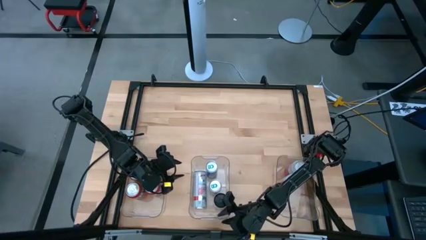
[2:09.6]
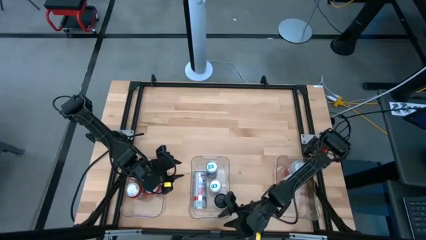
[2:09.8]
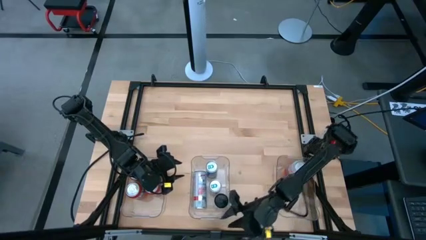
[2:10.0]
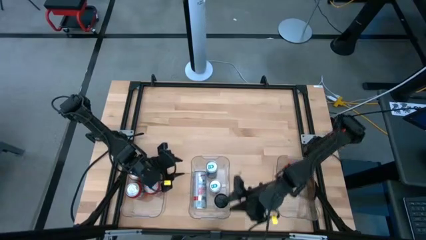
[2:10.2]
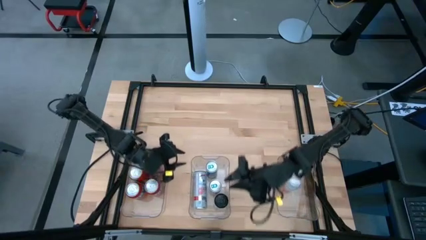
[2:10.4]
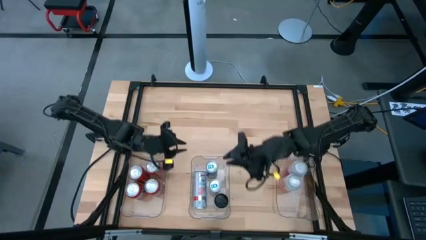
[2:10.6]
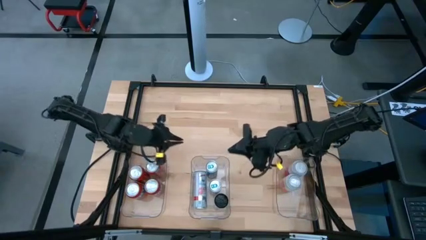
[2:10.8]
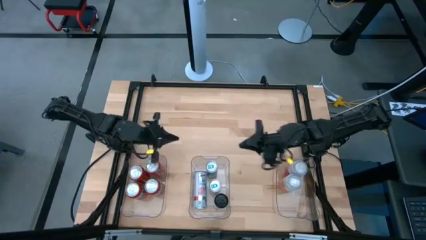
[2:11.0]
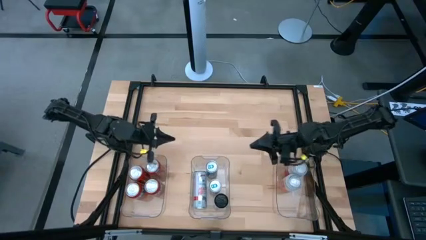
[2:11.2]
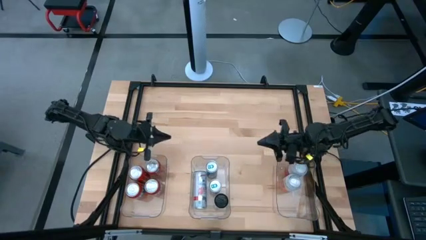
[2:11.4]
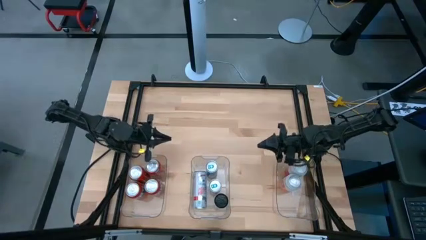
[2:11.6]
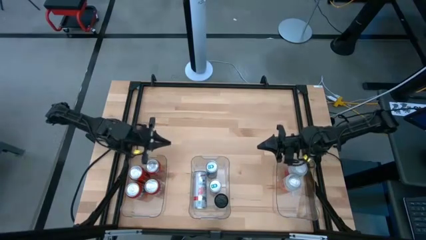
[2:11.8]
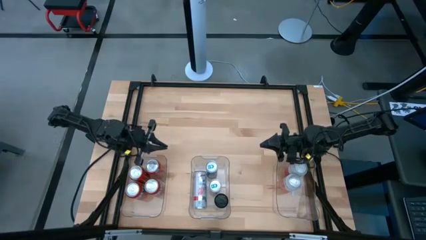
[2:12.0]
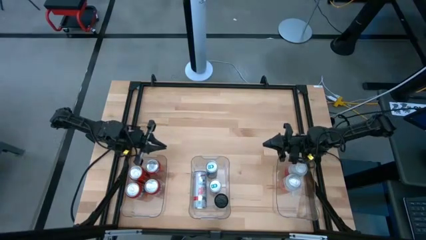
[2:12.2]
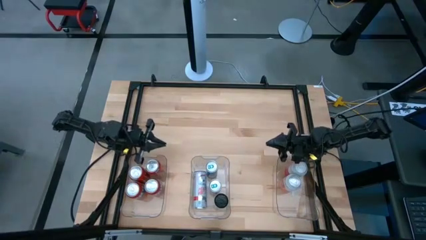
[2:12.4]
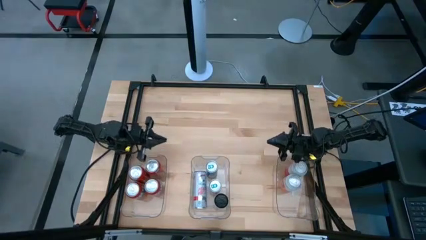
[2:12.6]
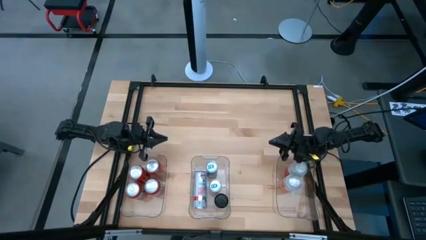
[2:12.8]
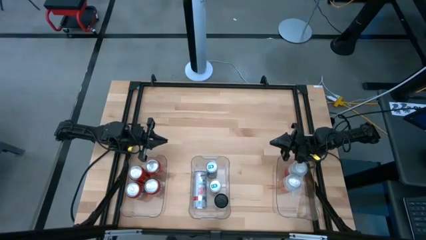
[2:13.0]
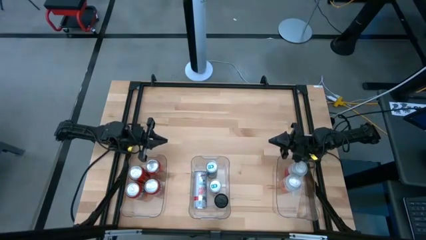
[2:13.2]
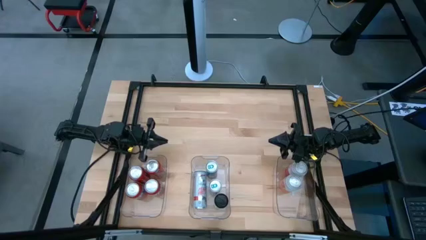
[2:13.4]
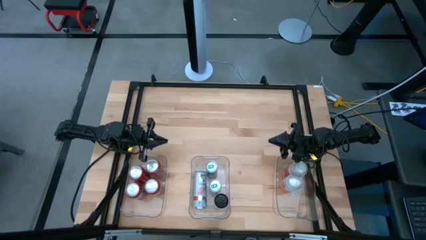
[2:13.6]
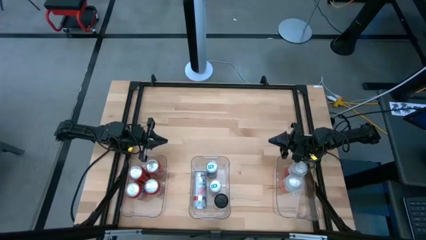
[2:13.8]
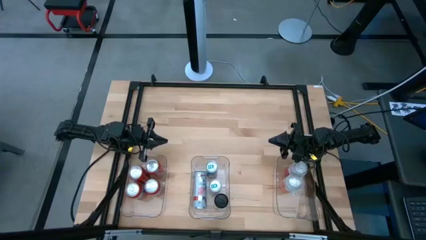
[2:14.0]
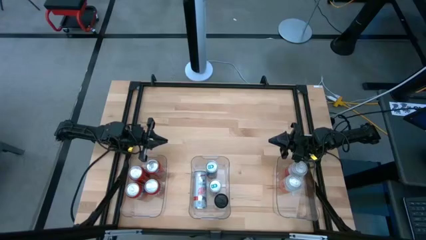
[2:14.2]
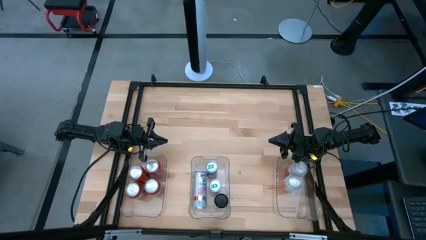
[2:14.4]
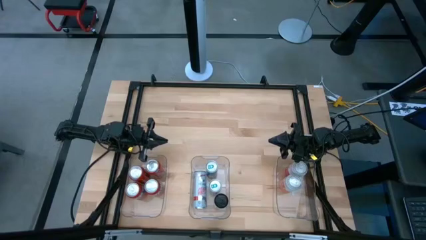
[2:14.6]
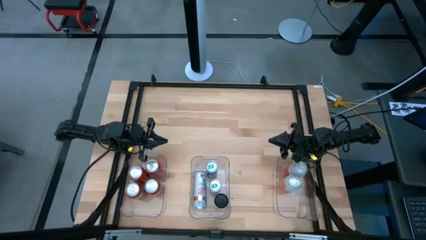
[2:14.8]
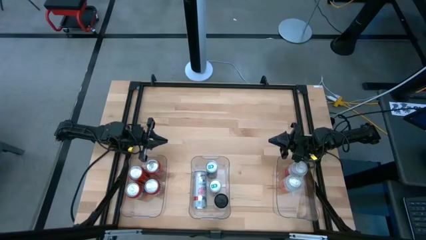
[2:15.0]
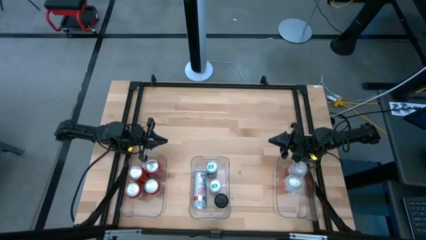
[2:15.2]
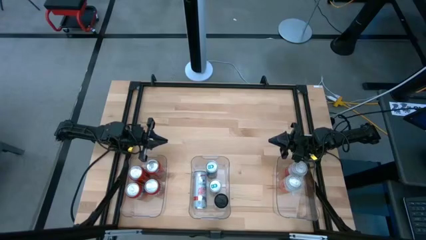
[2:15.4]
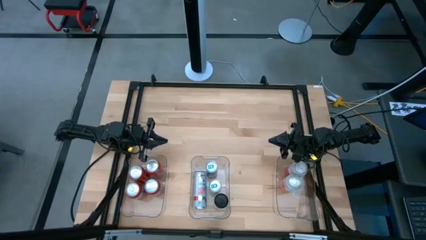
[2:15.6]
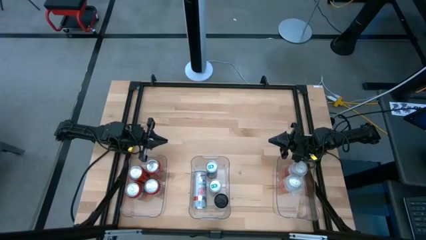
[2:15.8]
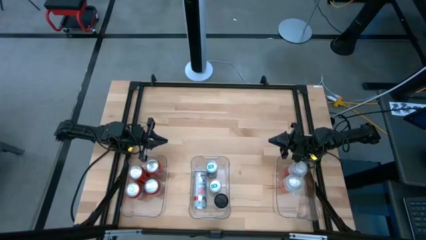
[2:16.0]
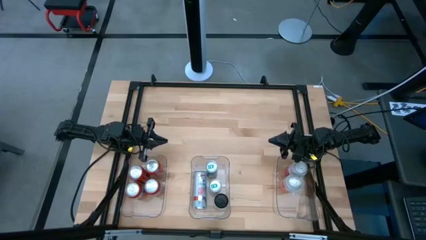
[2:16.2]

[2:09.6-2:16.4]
Task: Sort soda cans
Return to Home Position

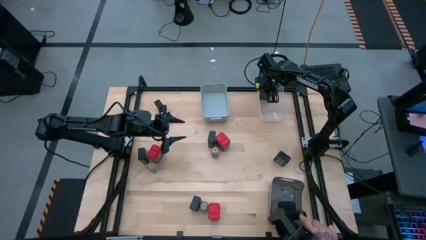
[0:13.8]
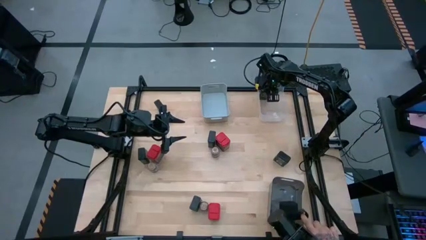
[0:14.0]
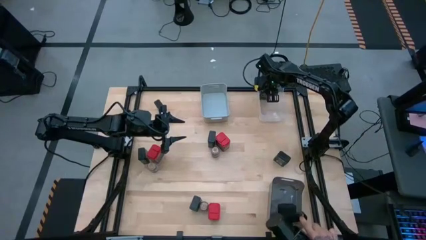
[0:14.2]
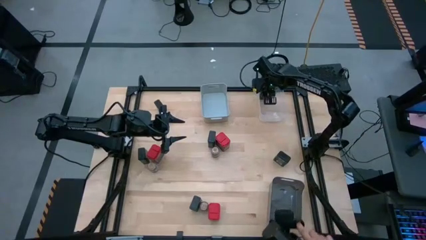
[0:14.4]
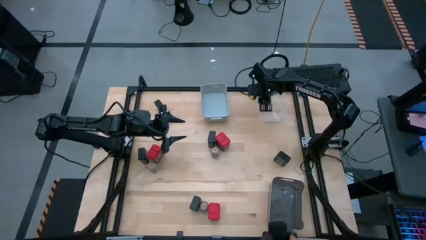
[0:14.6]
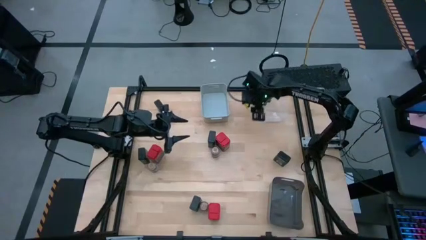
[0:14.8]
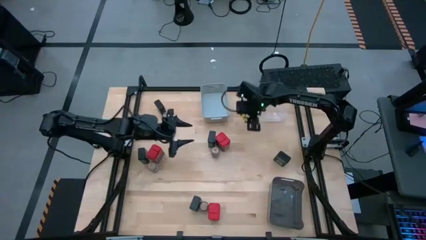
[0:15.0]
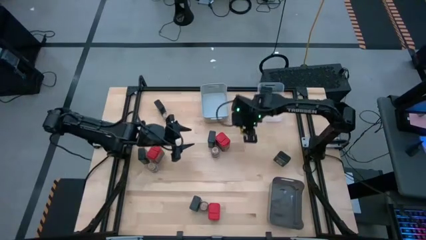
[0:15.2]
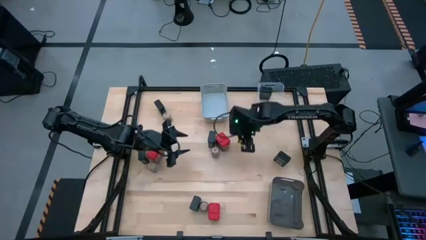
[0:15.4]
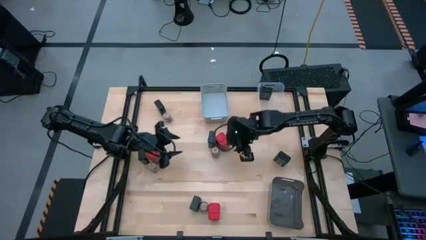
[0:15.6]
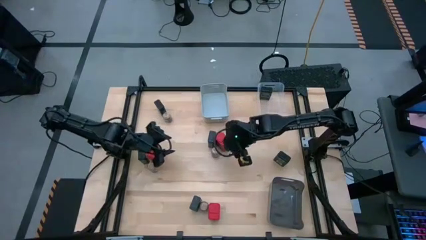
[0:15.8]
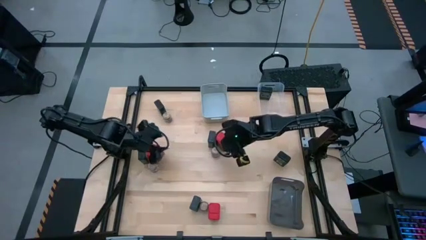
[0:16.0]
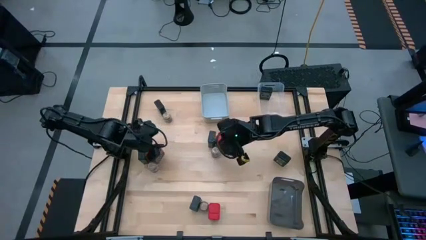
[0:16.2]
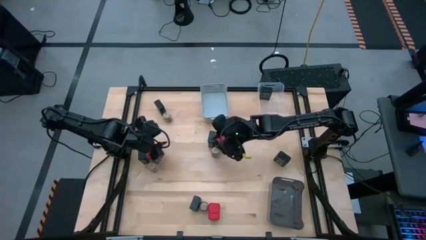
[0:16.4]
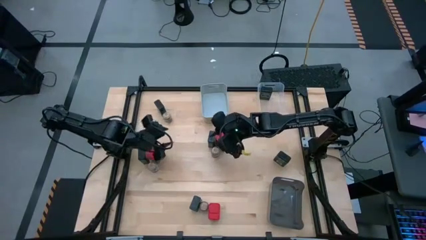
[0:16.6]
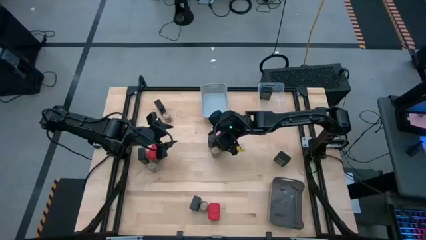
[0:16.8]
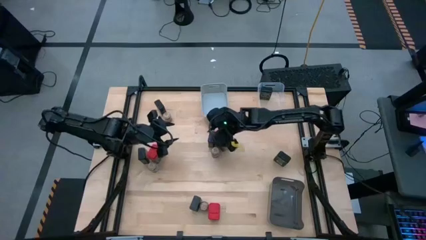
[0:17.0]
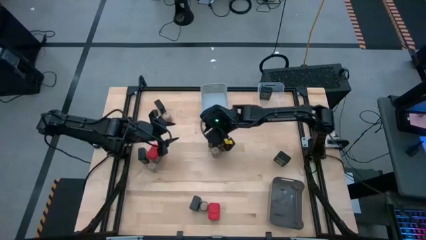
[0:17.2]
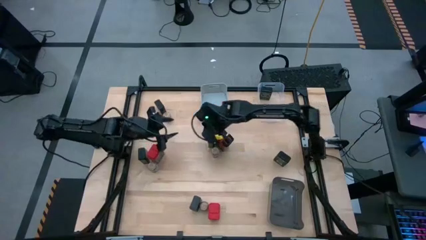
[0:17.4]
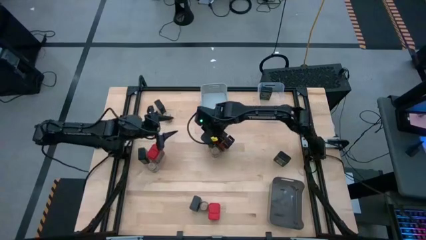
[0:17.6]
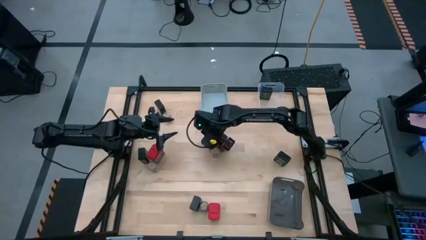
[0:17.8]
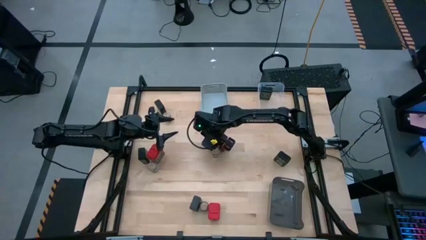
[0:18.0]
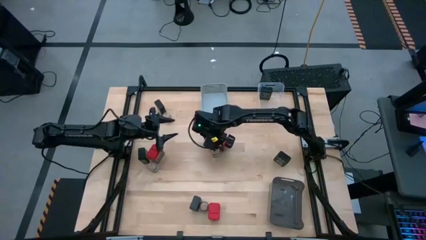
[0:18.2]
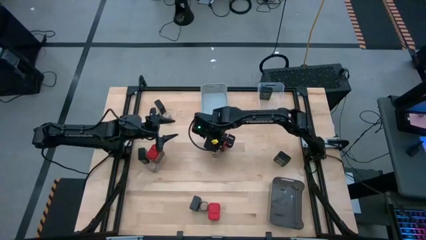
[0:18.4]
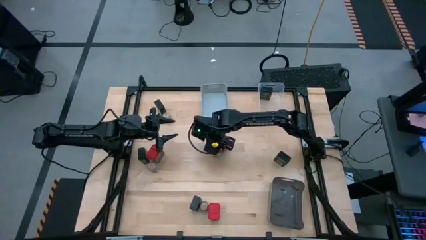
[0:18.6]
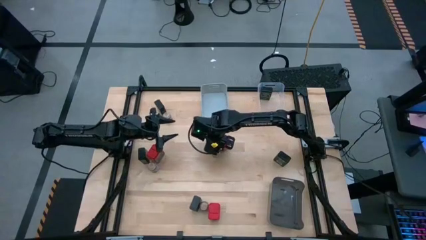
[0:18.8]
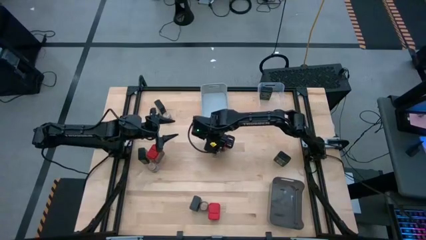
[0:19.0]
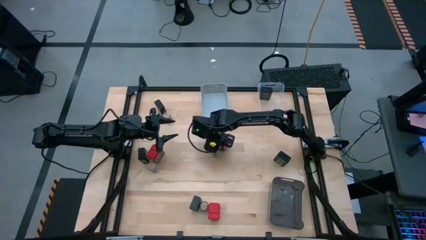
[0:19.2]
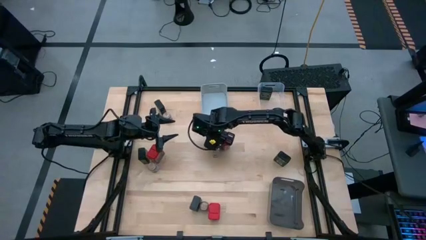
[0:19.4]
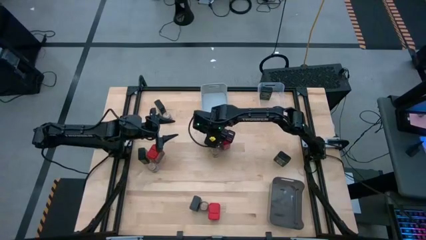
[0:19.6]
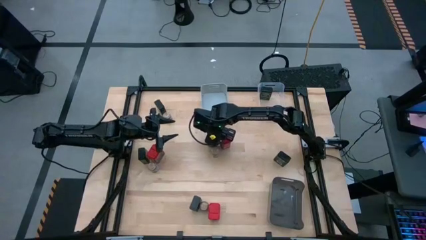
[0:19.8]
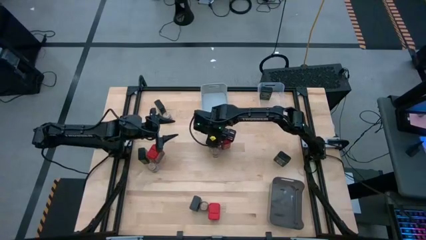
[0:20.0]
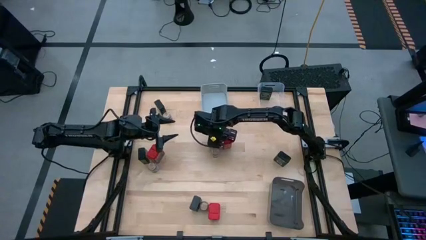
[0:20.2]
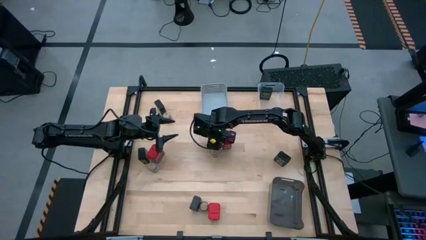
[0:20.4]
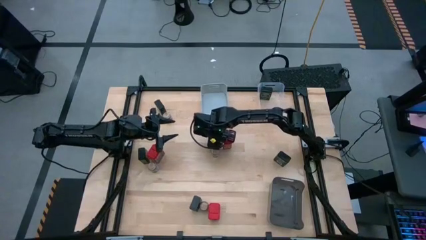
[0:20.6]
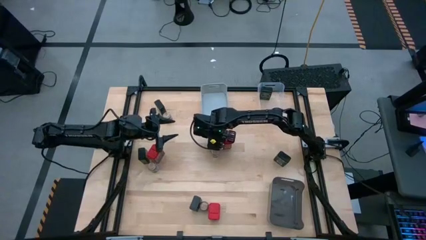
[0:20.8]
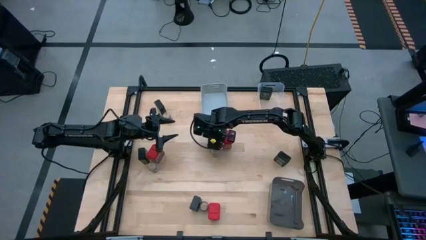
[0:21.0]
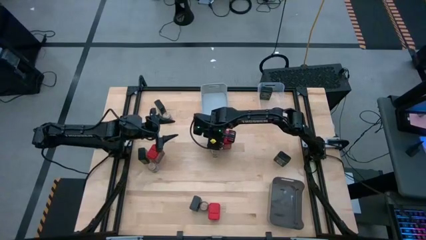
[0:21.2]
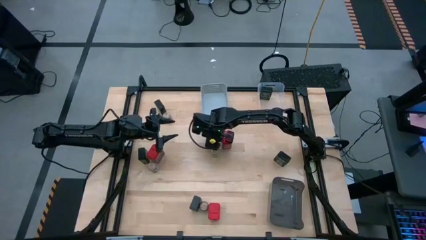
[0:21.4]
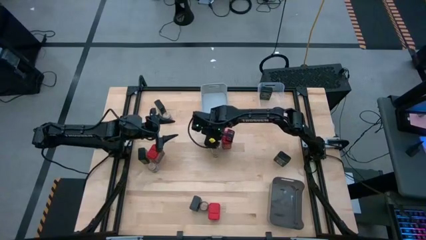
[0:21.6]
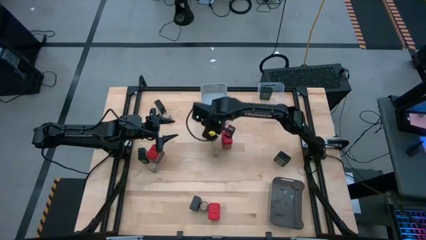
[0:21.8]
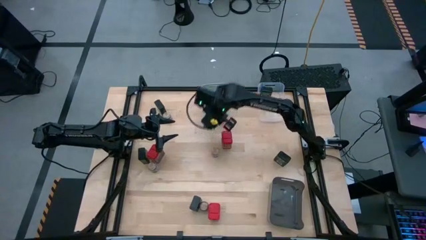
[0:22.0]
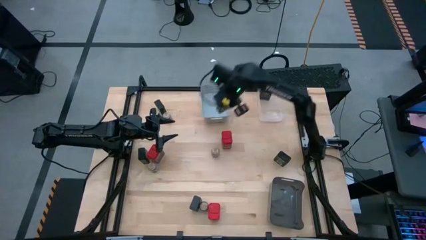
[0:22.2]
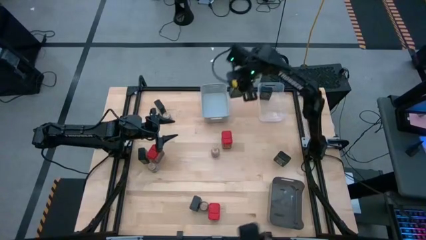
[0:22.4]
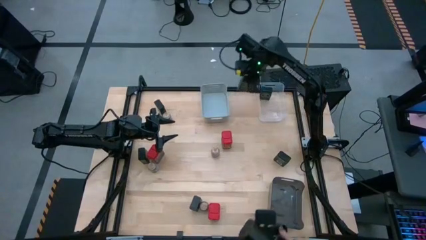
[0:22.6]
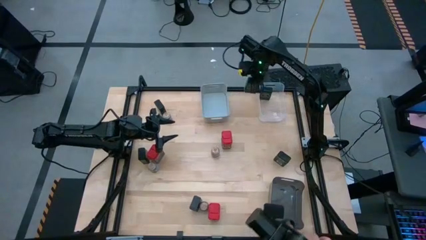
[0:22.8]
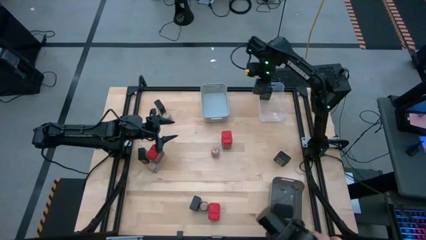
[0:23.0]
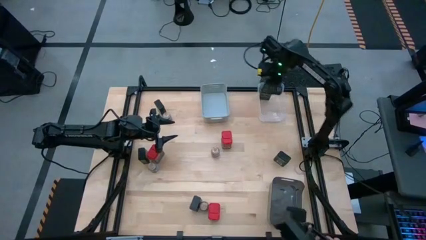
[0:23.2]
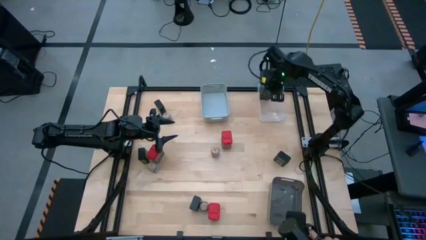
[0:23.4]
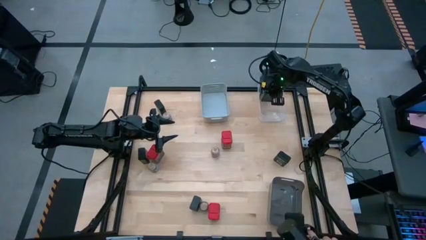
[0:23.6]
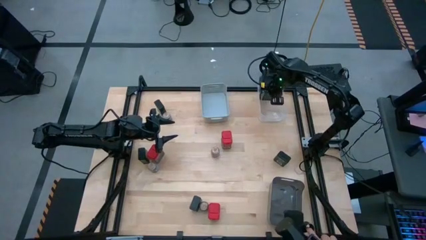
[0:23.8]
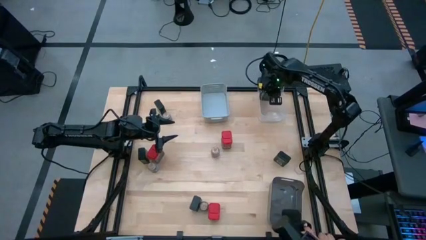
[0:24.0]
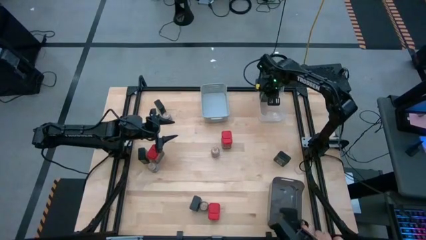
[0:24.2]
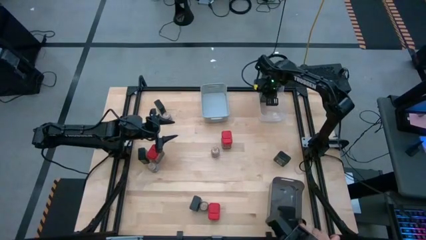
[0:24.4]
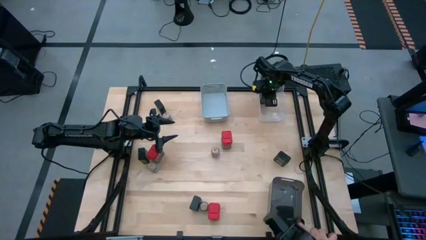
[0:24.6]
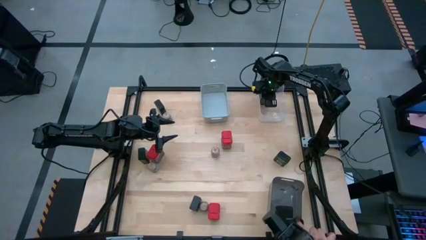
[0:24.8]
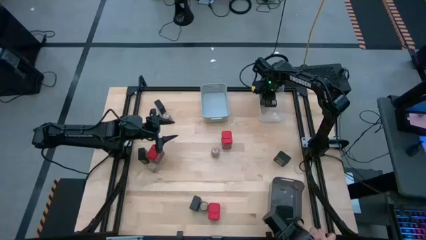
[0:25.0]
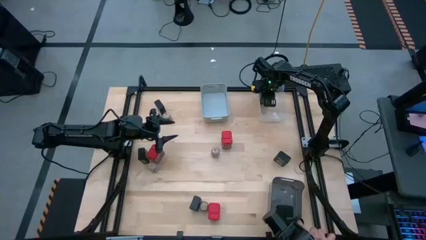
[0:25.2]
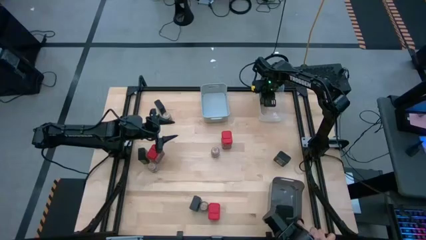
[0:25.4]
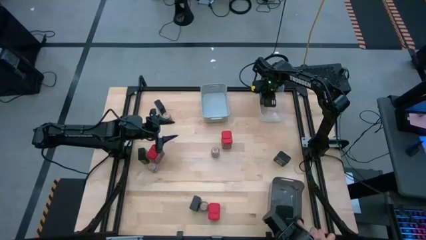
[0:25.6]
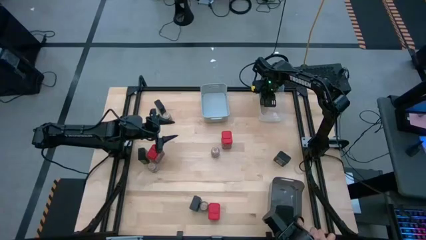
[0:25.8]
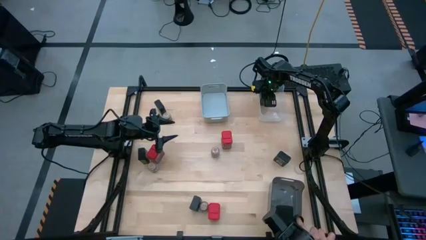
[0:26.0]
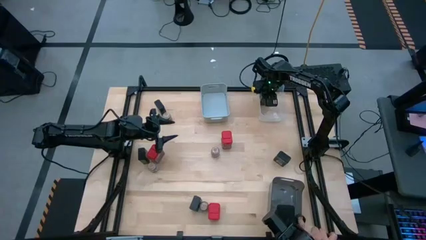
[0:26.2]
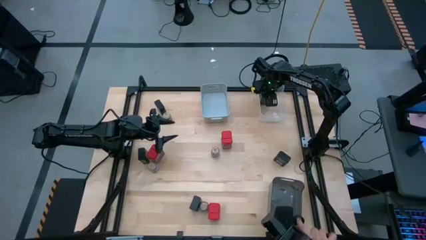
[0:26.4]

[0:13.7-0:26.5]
Task: Sort spices by type
Put the black seasoning can into the transparent bin
